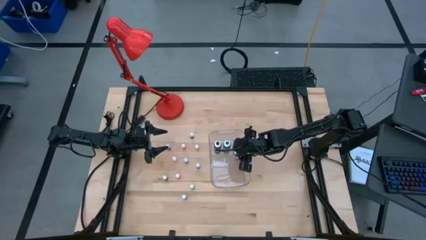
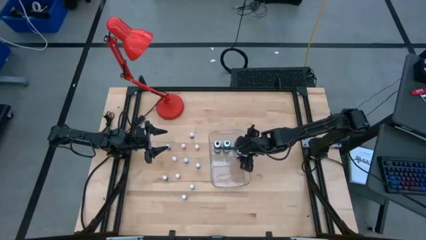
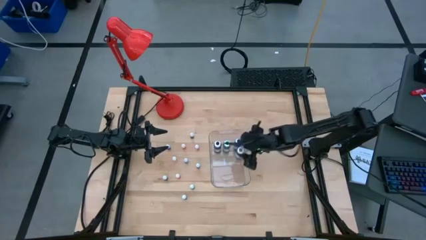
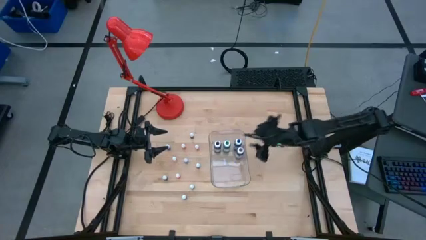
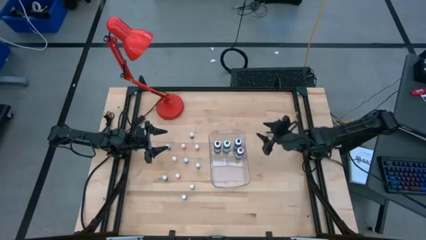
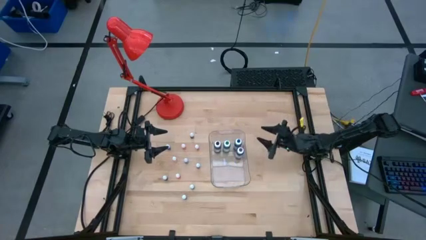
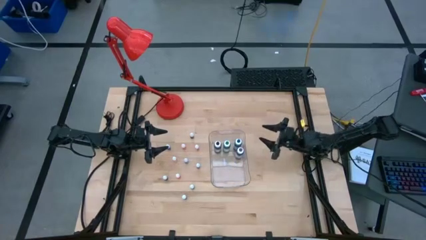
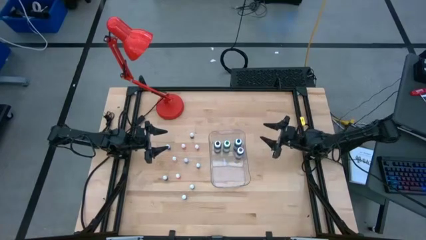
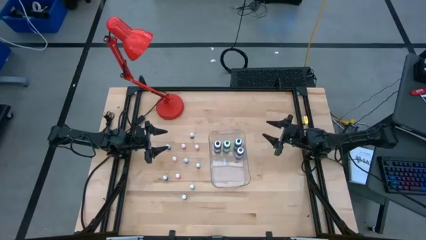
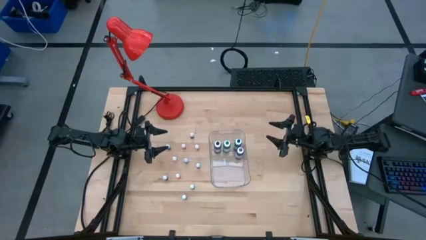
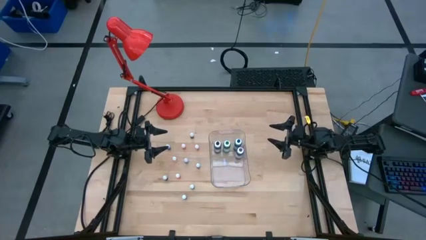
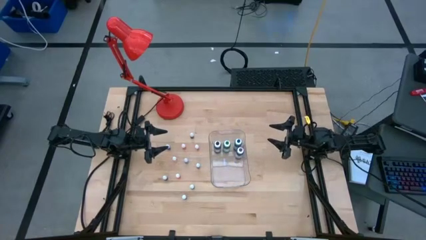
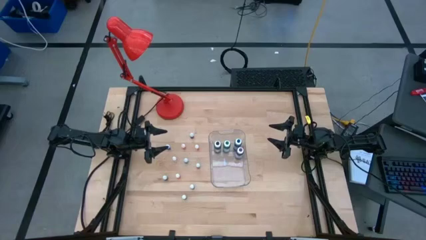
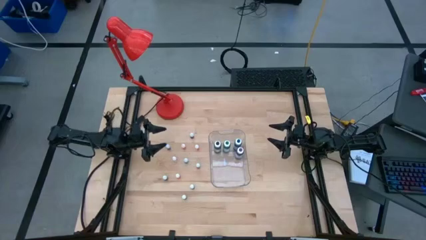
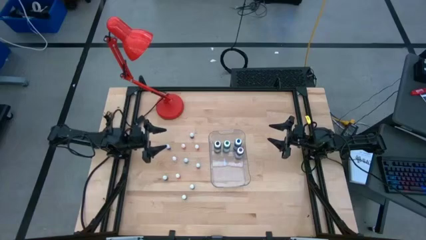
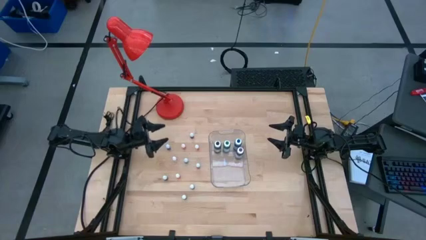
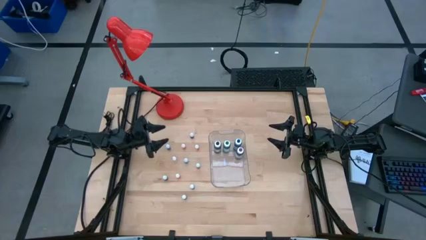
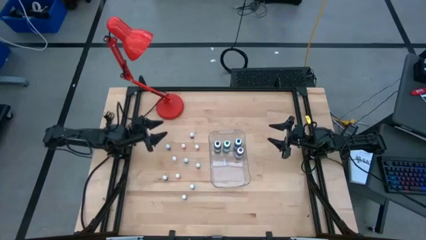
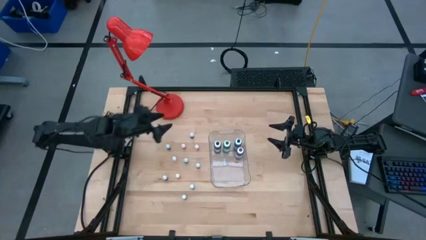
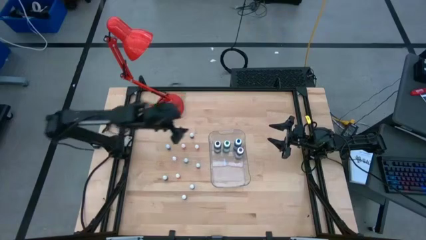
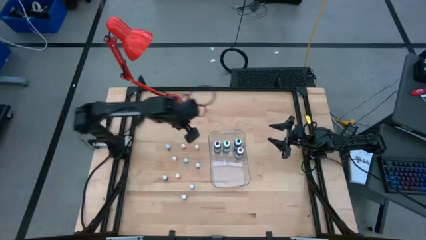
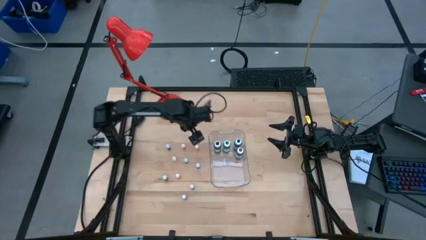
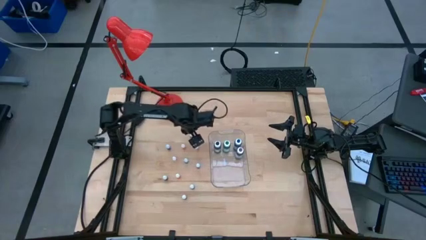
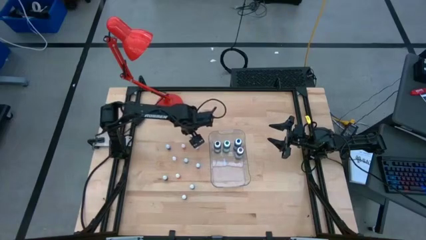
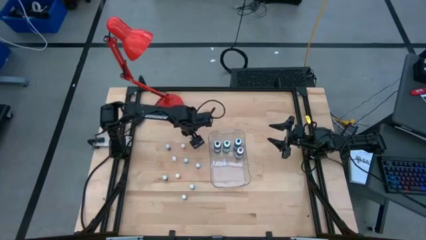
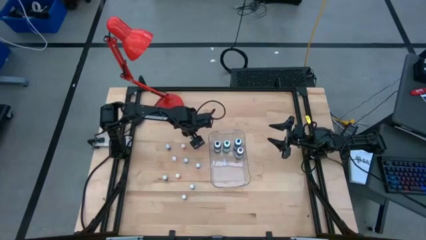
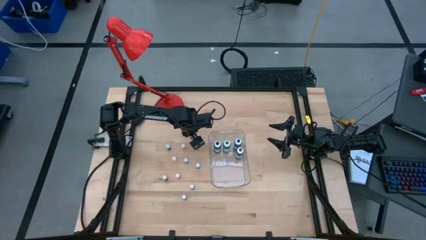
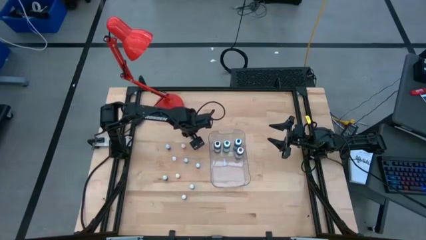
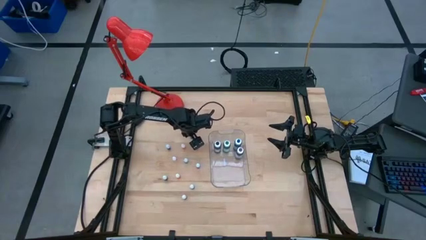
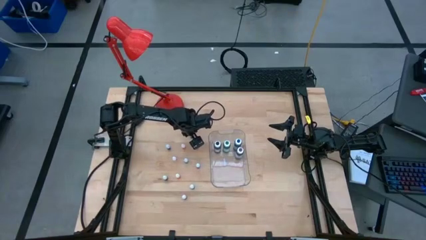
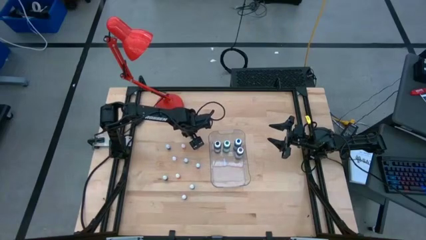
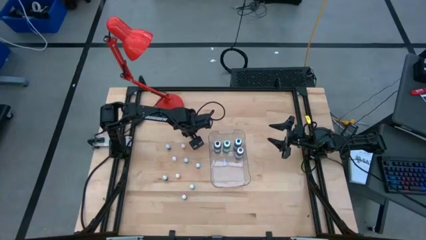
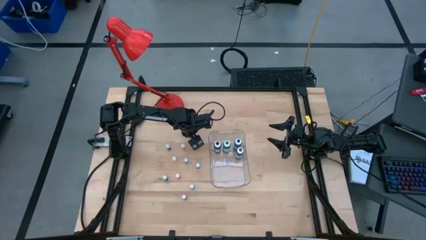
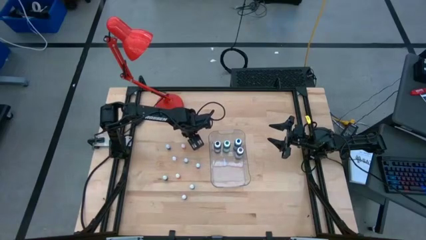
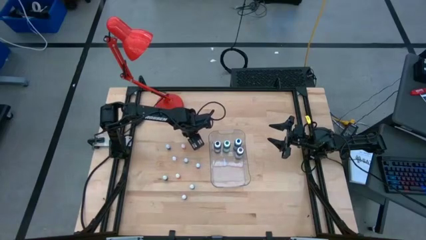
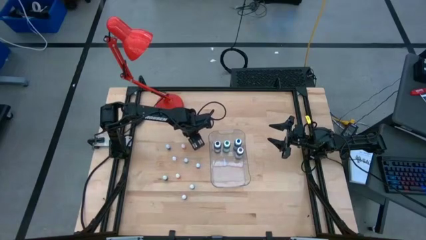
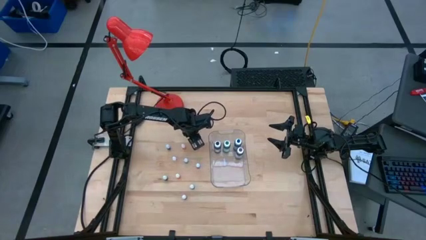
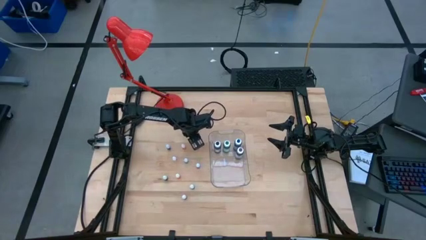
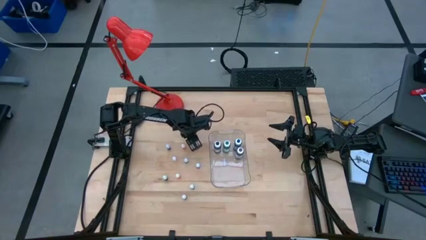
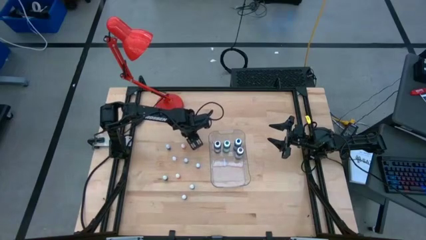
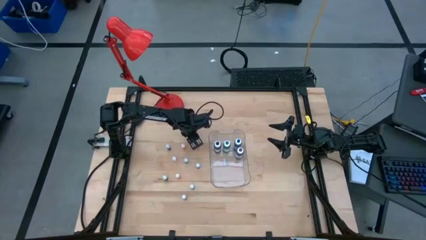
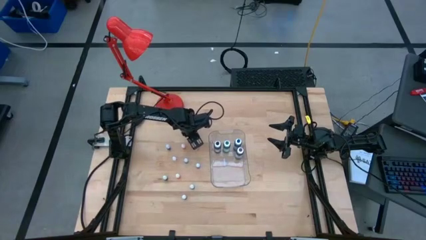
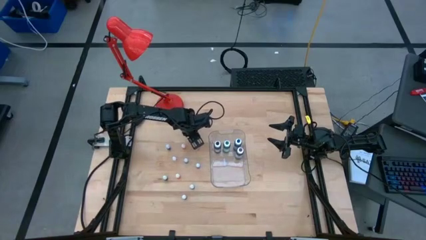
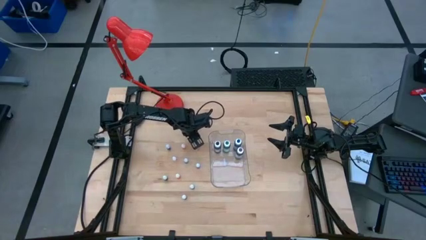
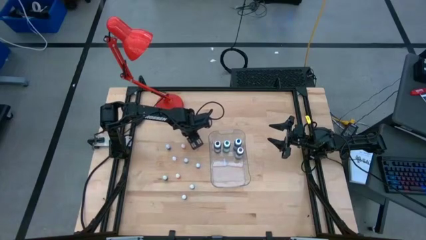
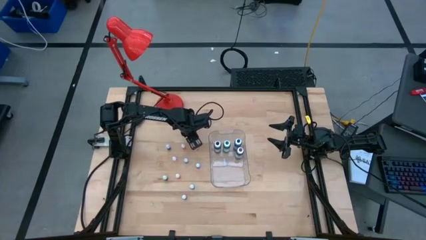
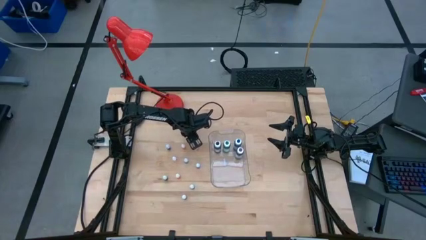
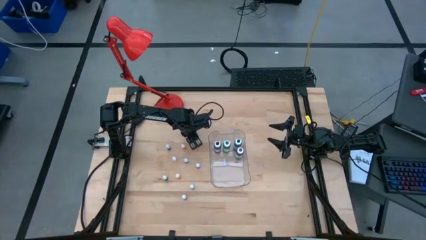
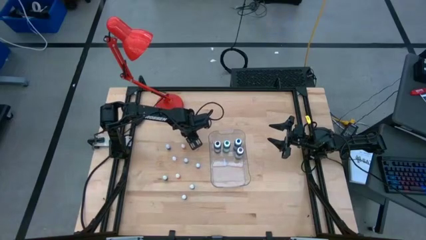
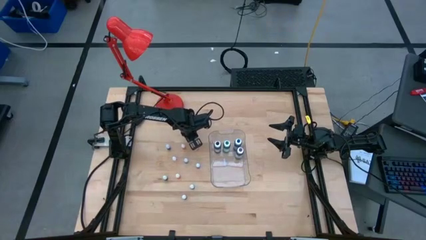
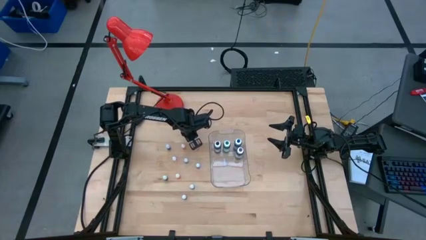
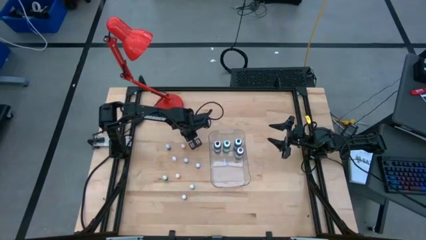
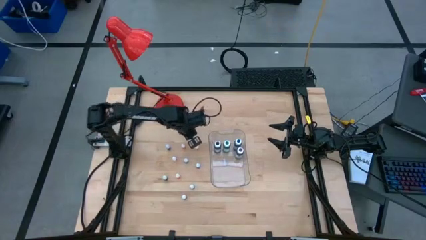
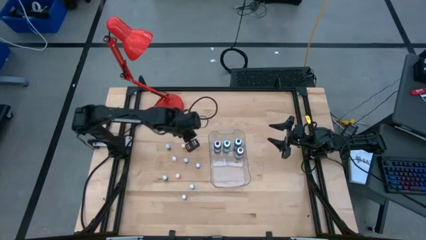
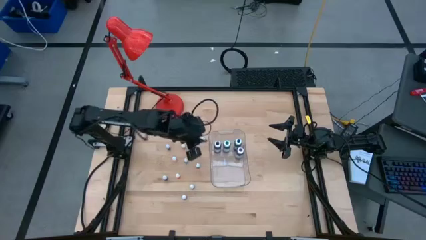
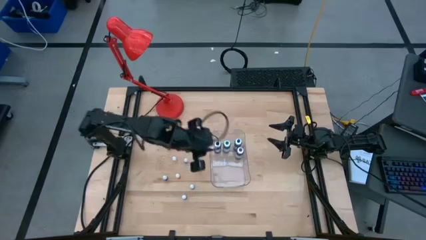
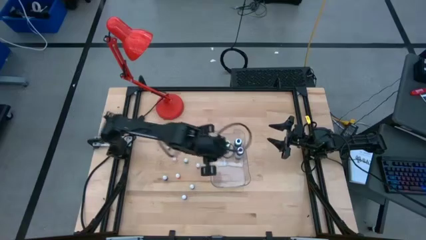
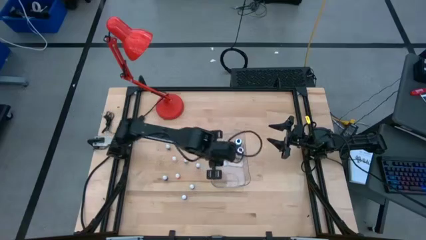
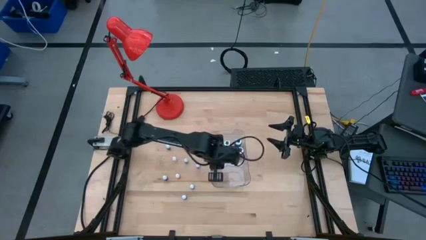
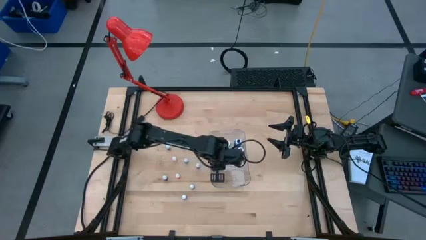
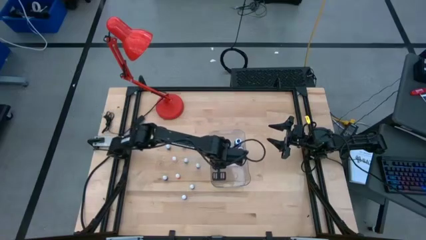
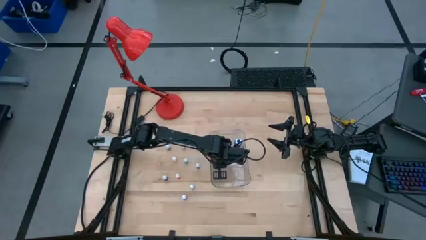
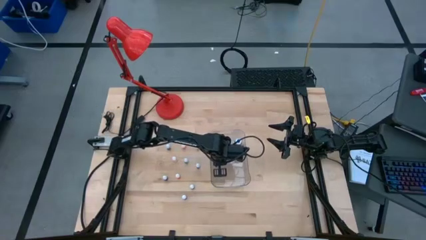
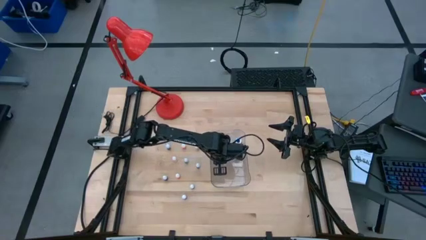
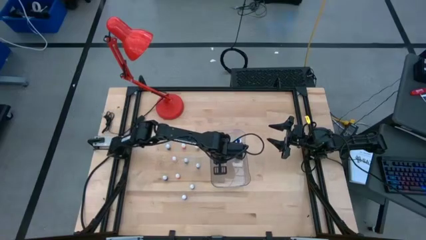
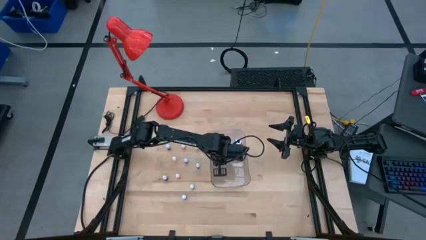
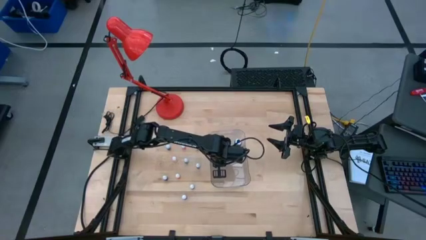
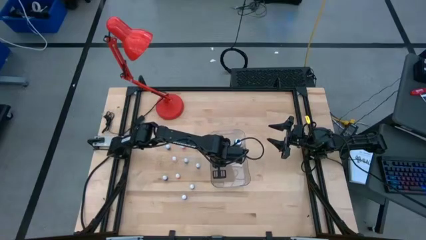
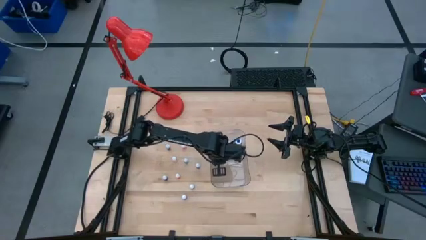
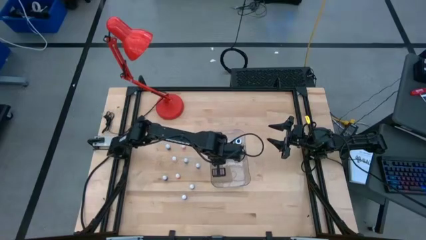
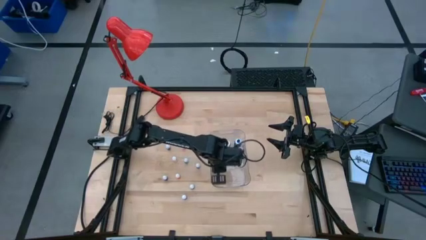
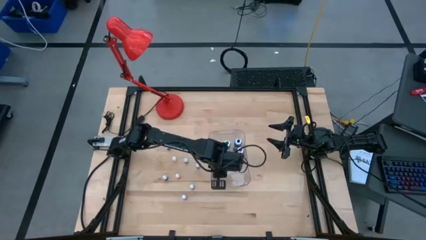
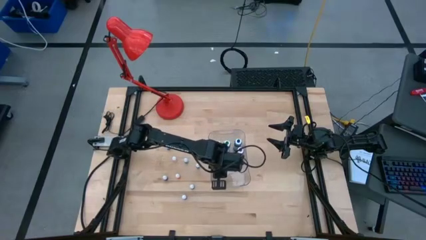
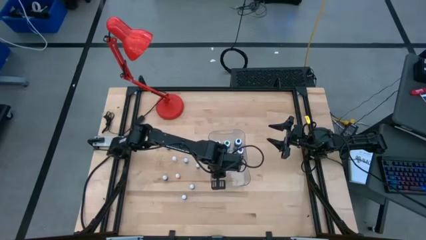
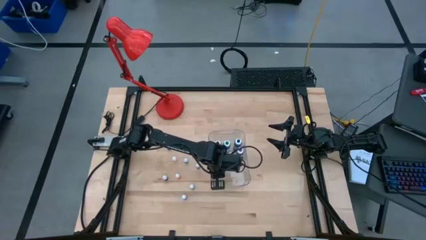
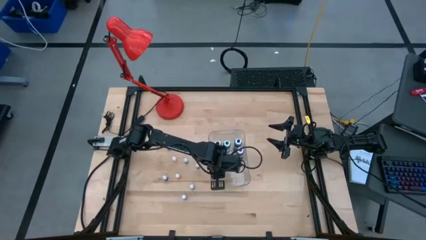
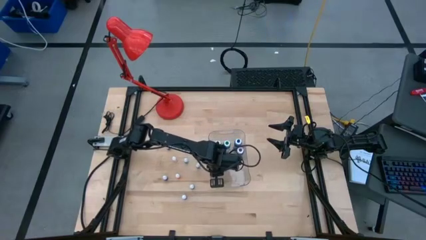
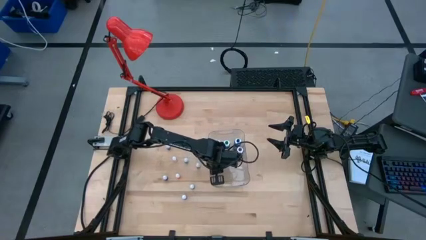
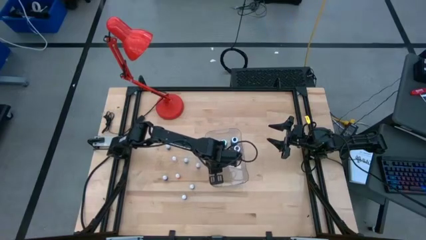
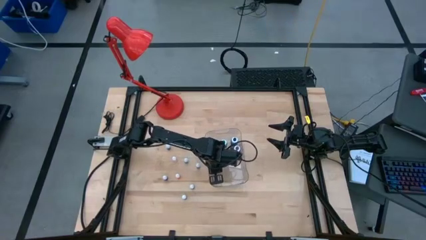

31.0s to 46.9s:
Task: Pick & Place food coloring
Put the orange food coloring bottle into the transparent container
